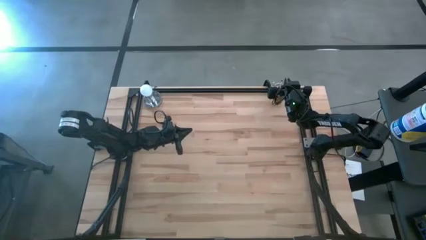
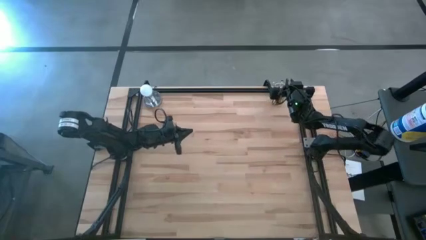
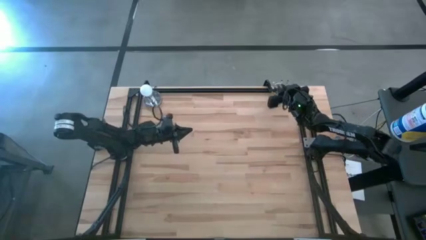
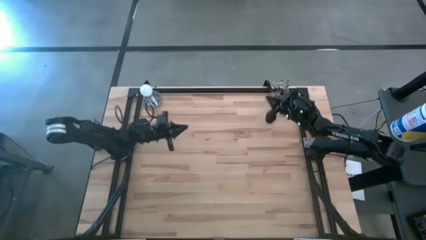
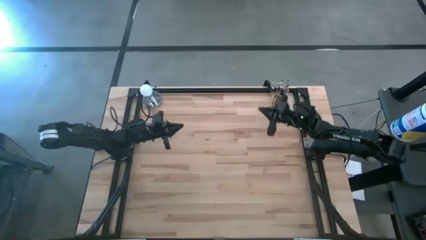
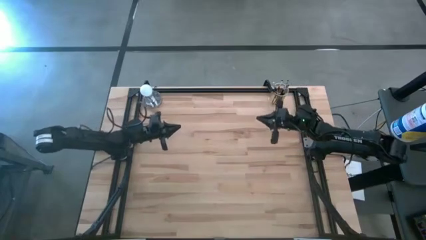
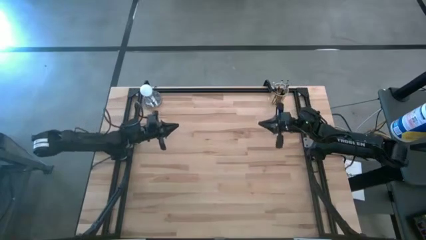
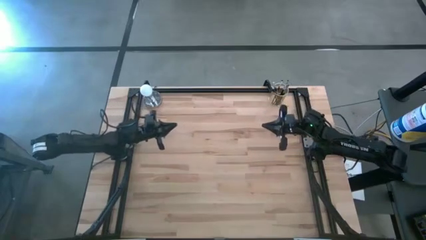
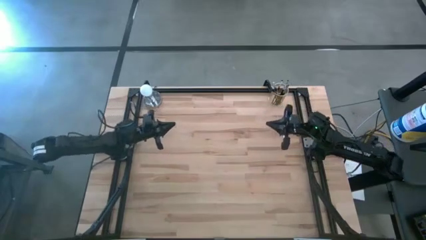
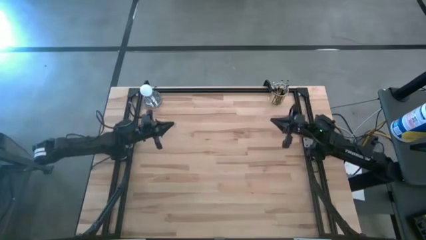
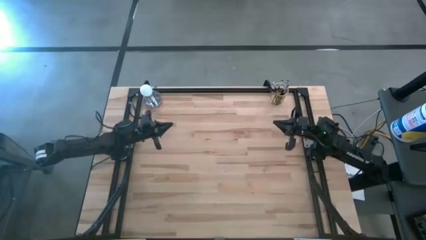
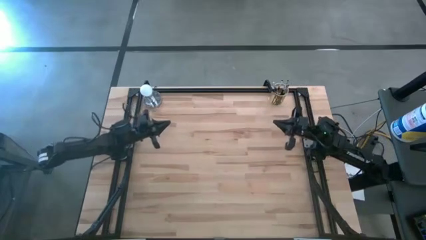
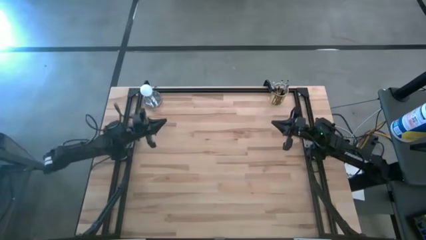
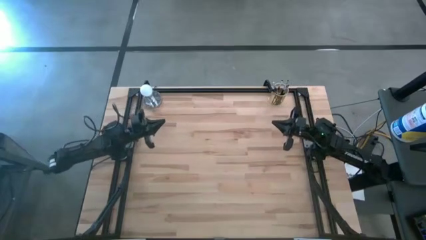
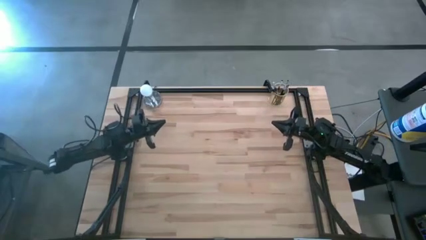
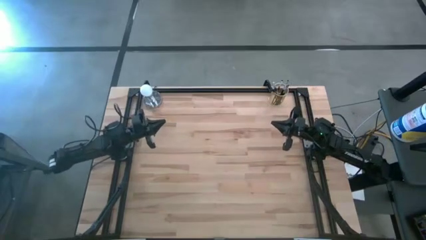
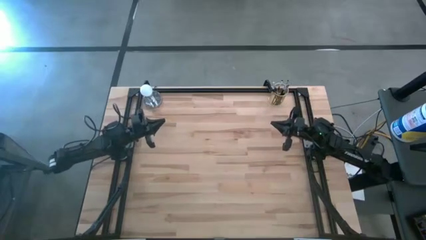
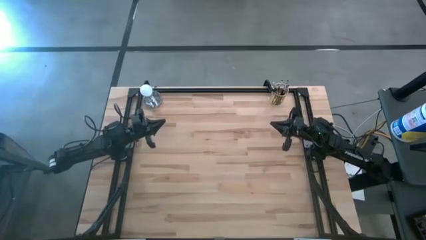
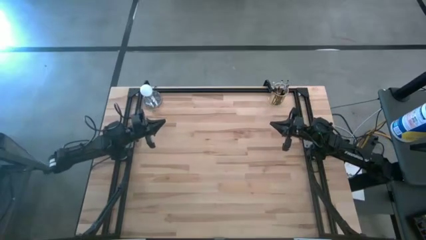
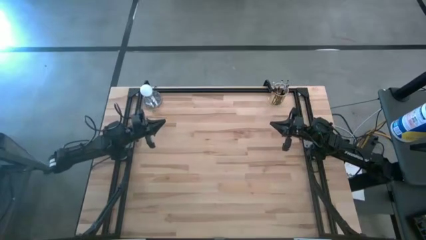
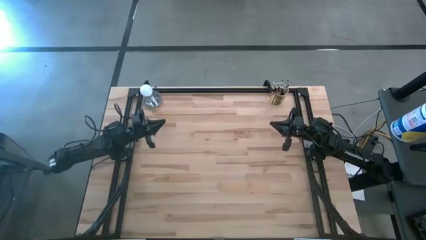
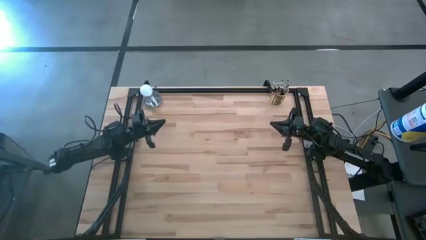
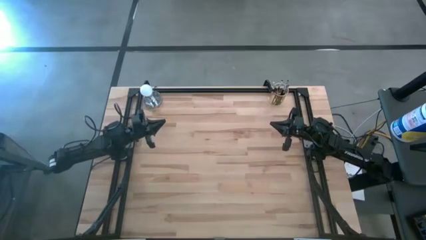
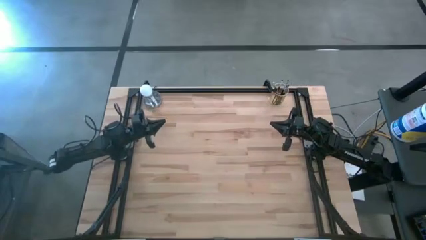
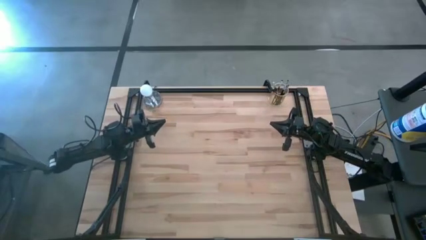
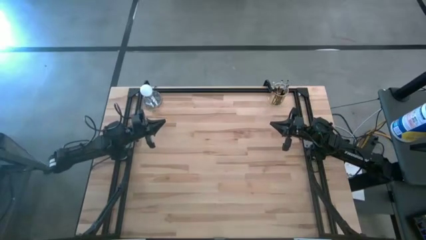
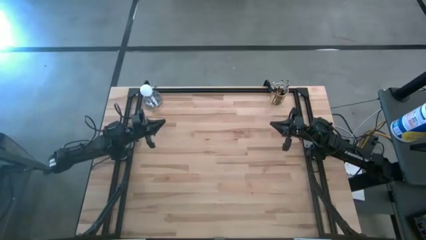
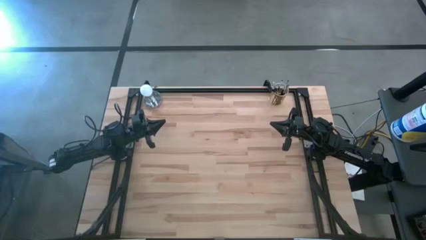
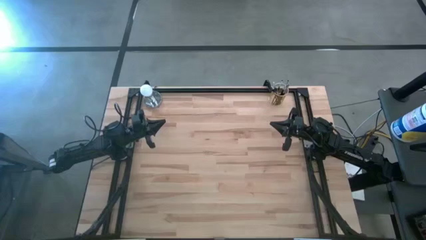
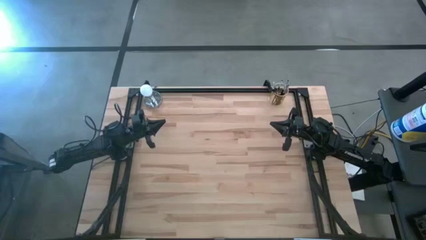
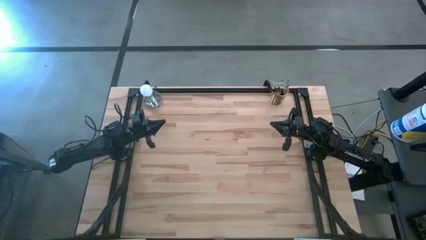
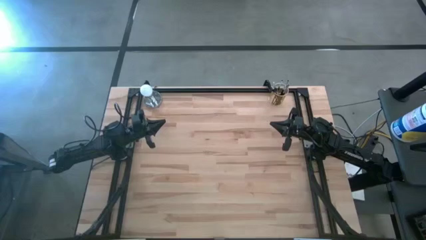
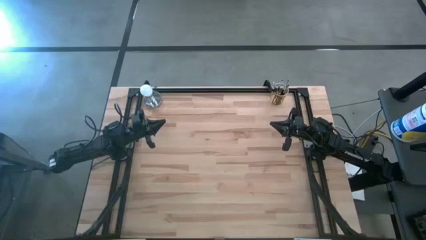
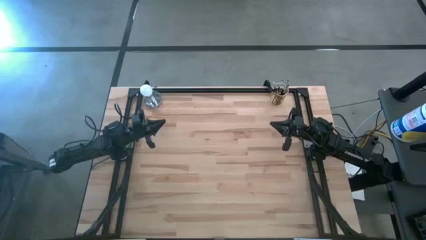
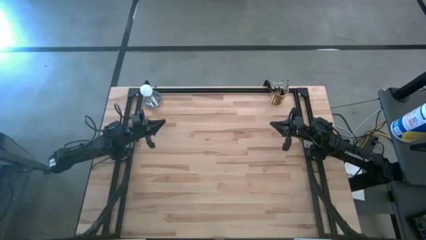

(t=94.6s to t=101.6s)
Task: Sort items
Return to Home Position

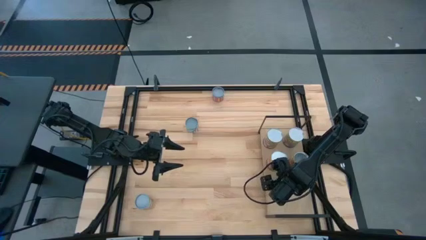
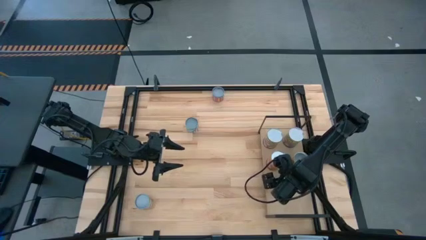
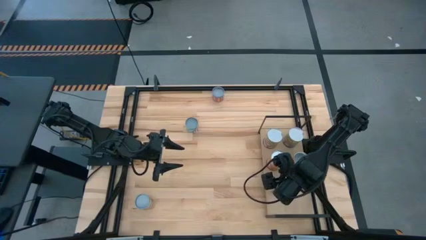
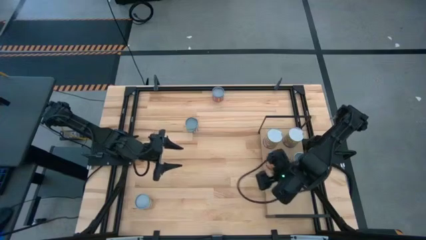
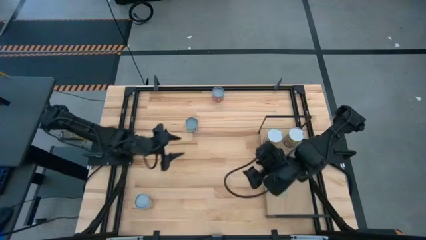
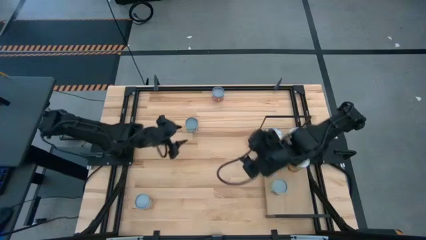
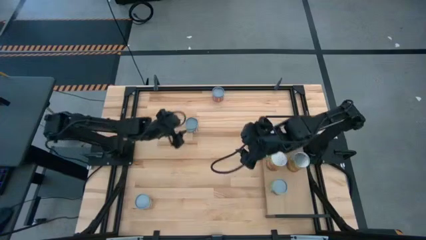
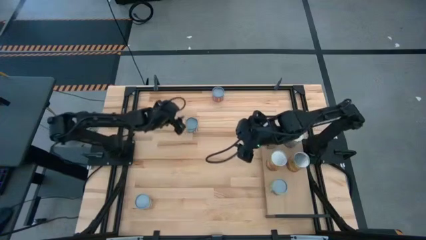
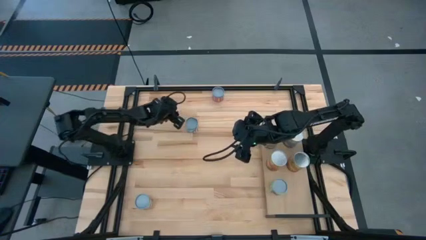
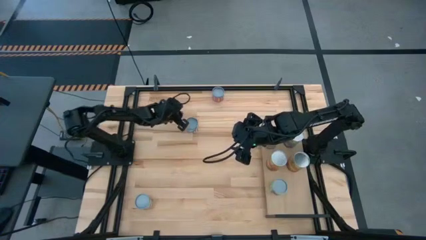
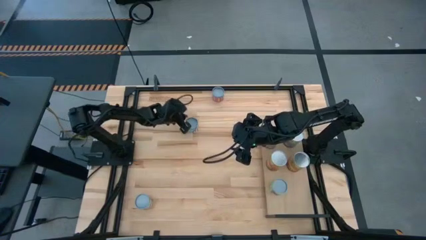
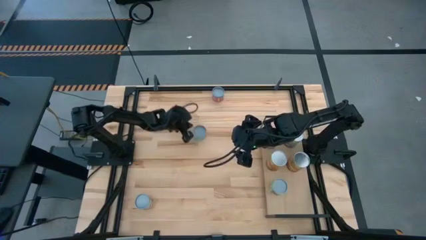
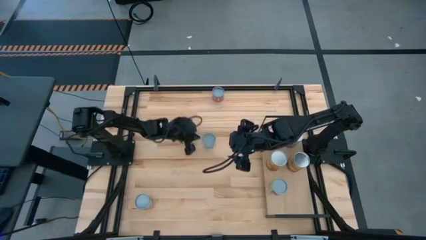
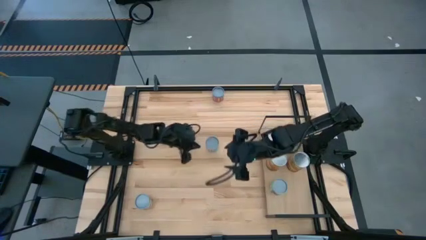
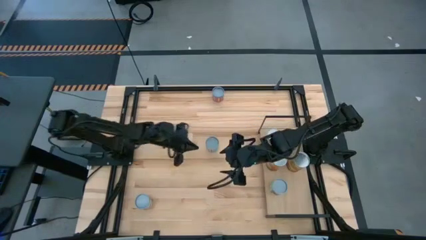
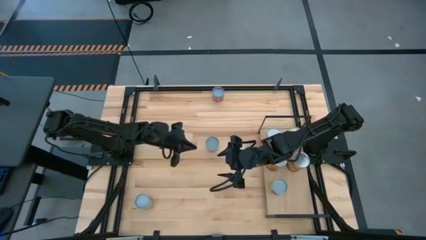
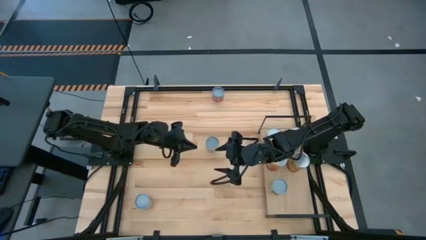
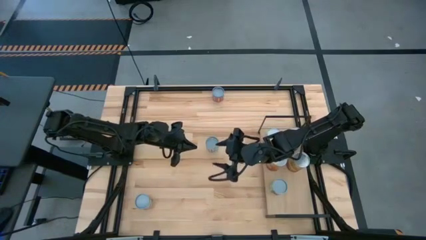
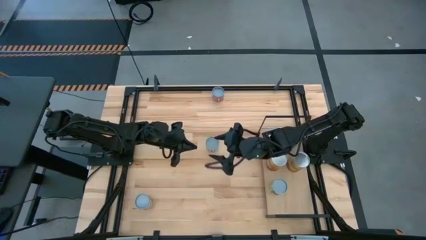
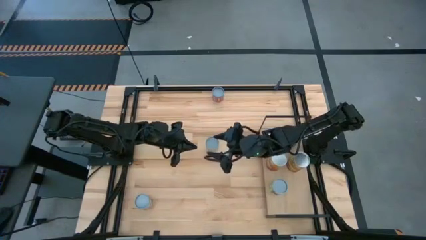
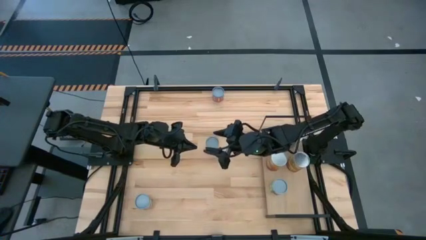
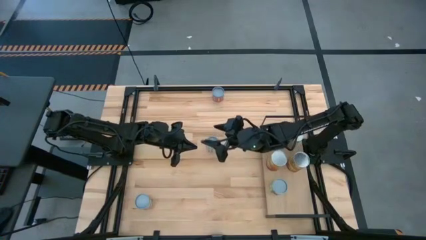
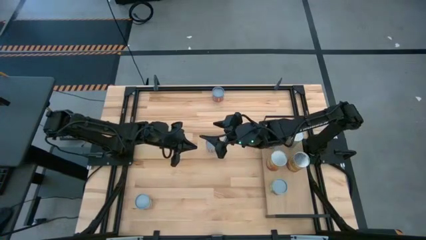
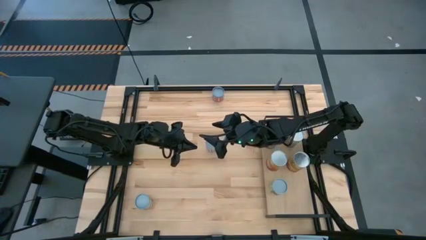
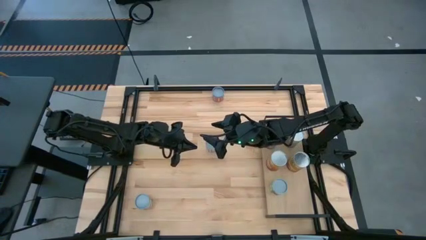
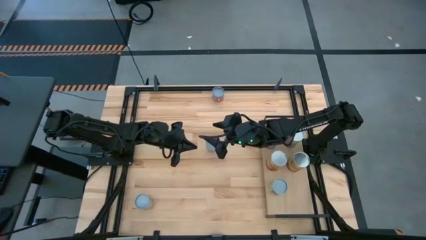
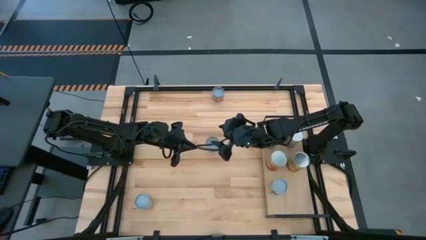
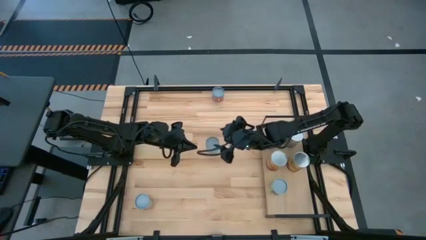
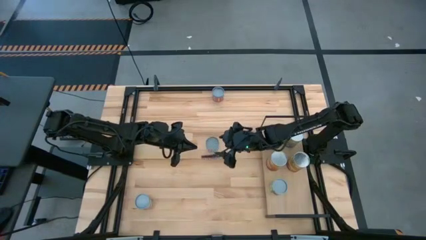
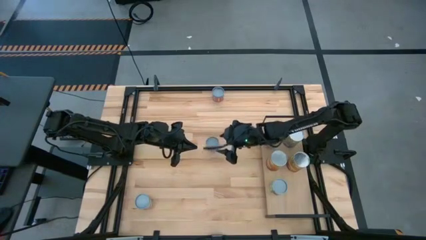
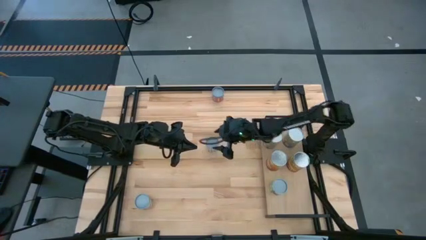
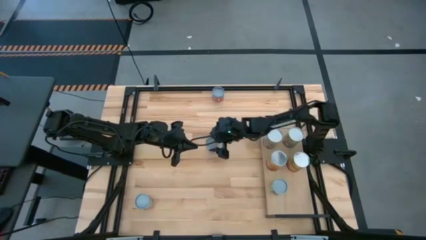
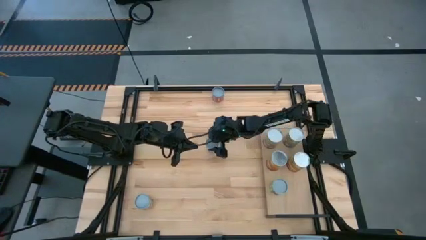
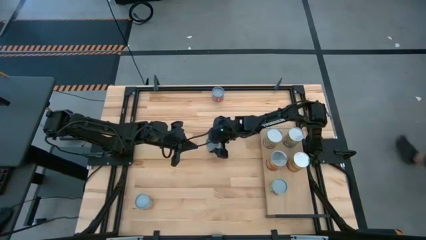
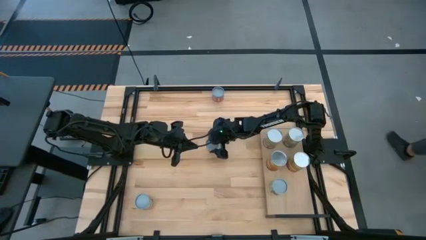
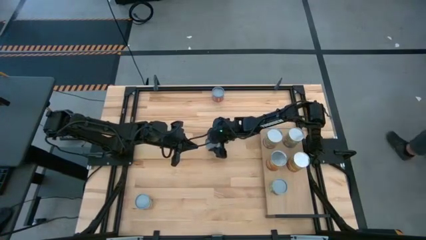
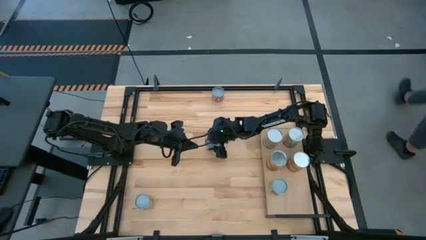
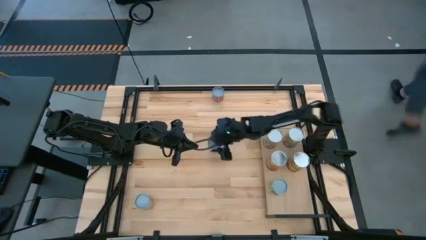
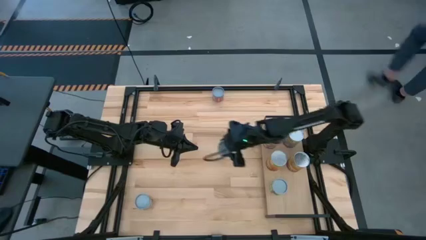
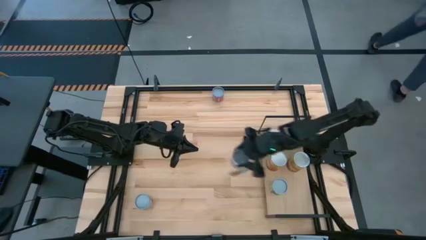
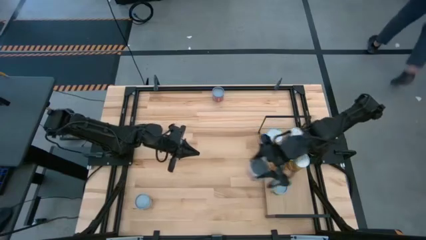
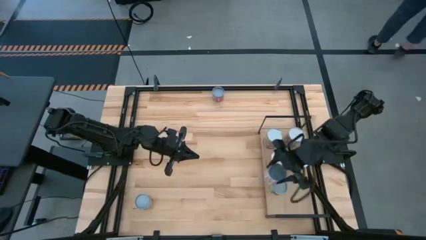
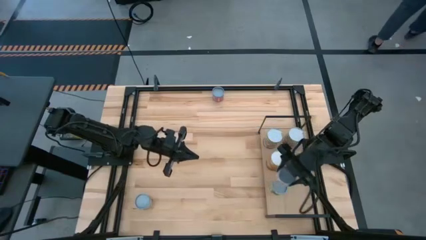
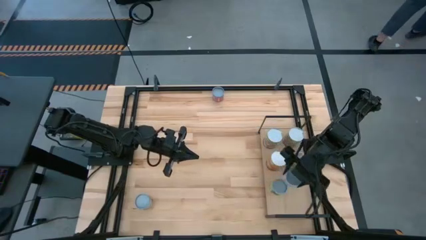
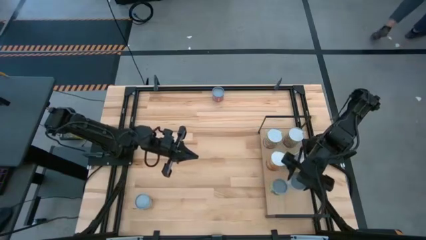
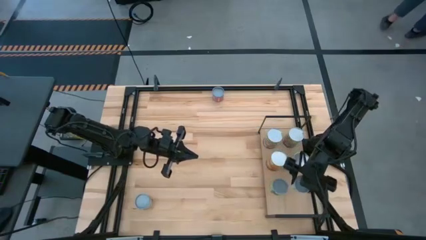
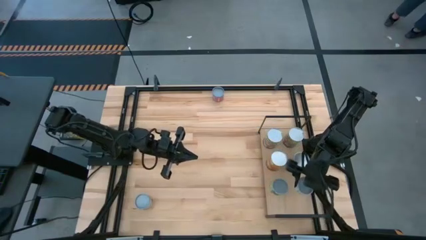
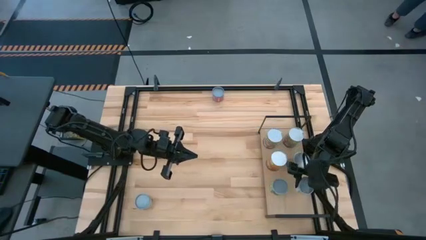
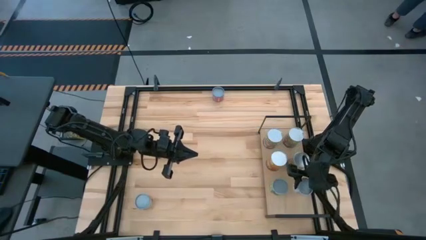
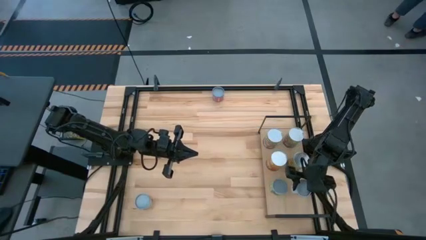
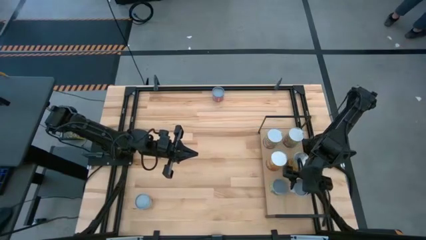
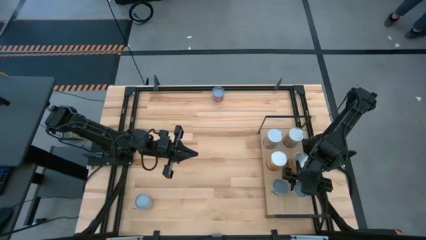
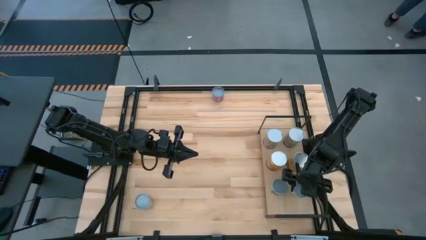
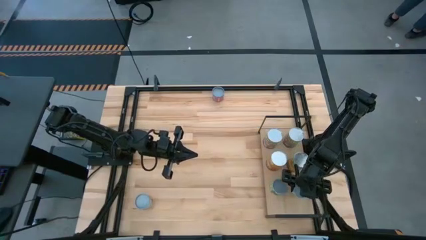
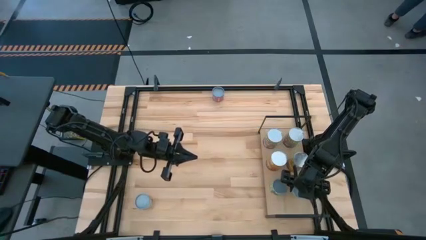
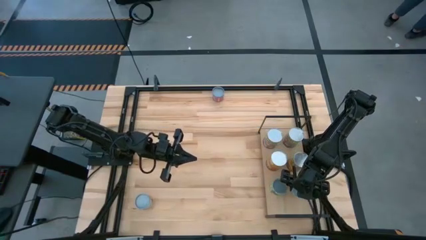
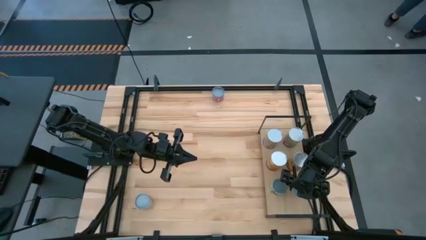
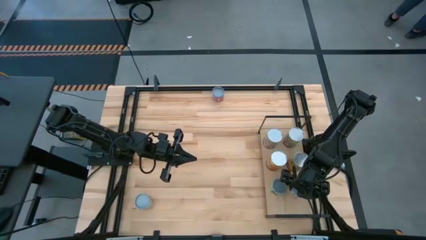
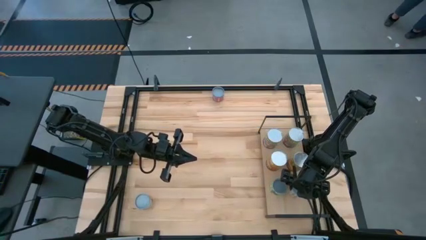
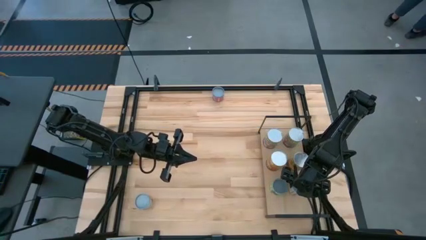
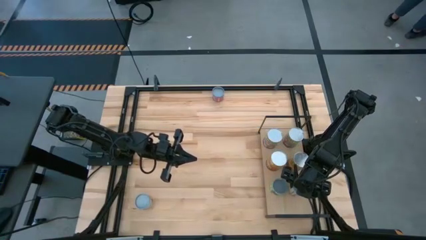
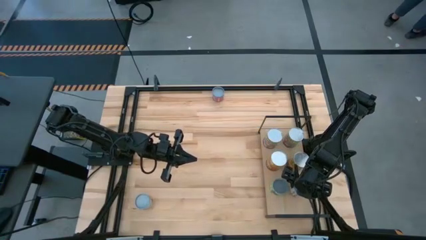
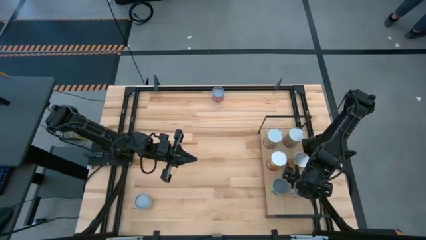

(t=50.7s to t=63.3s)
Task: Pick and place cans onto a shelf
Put the canned carrots on the shelf
